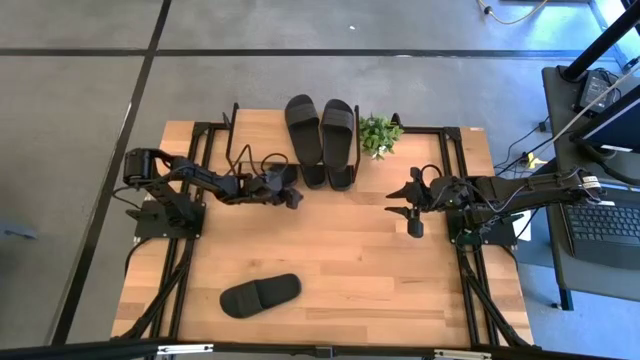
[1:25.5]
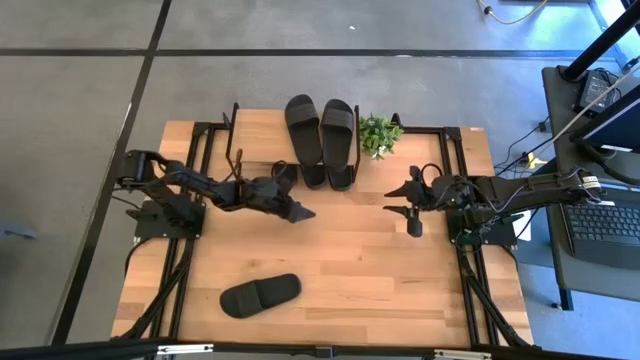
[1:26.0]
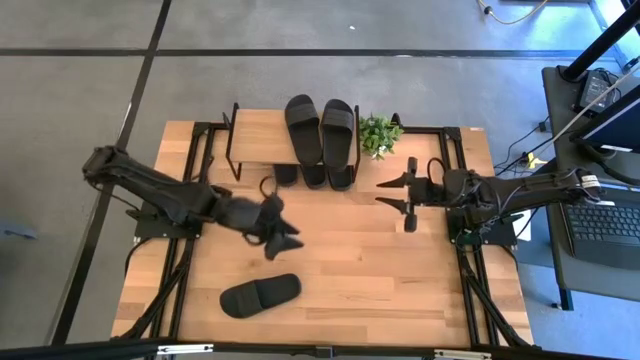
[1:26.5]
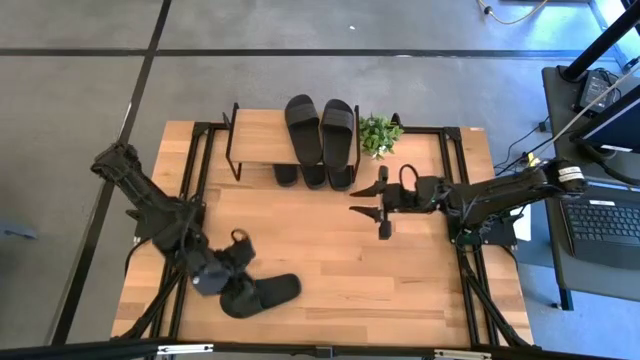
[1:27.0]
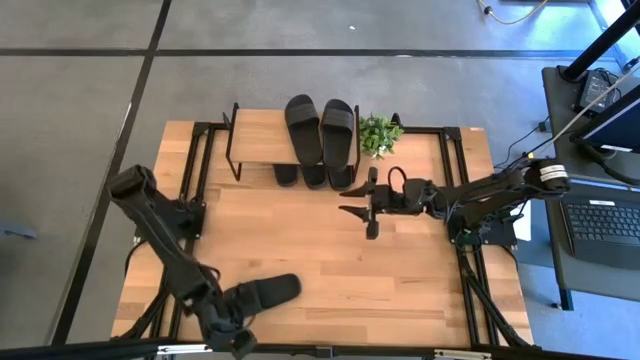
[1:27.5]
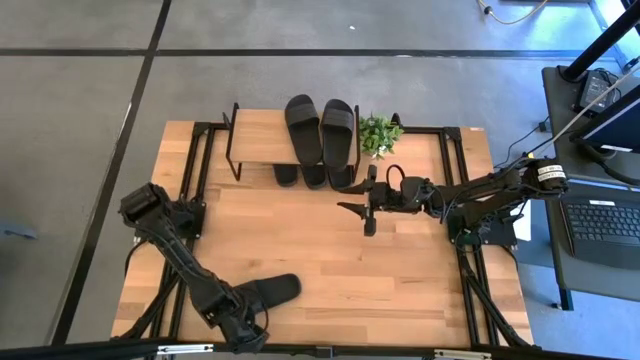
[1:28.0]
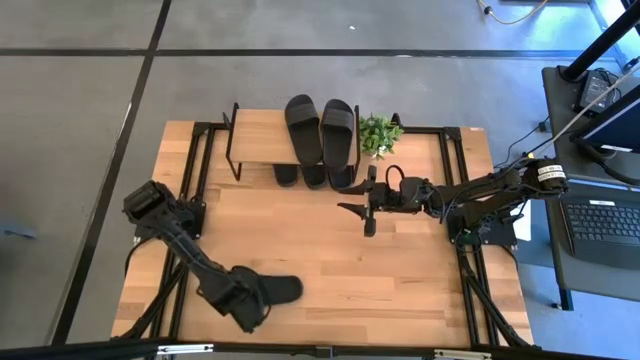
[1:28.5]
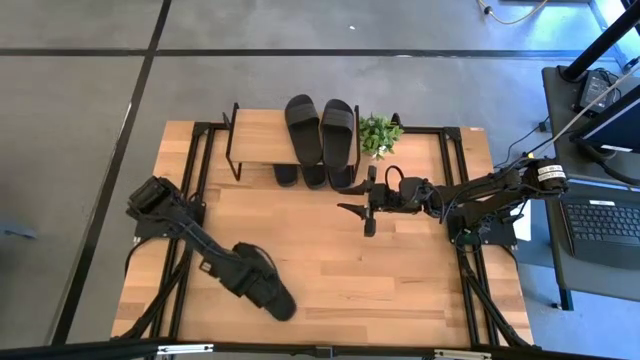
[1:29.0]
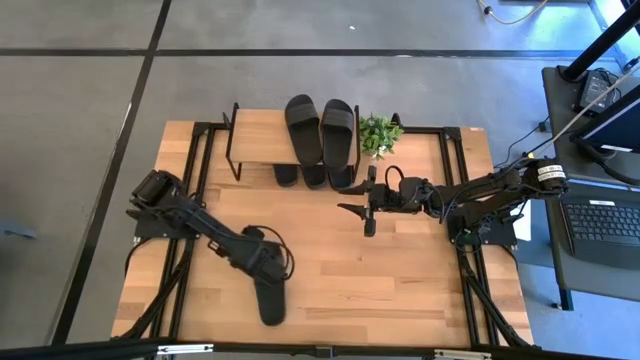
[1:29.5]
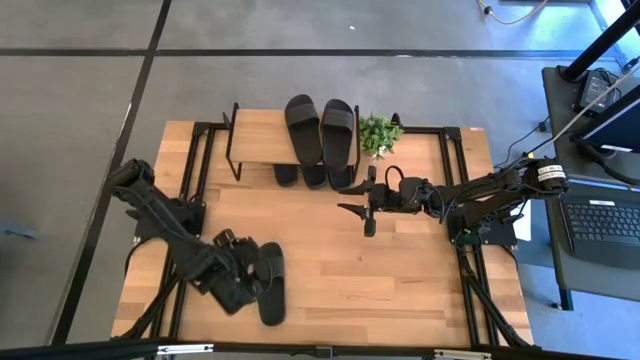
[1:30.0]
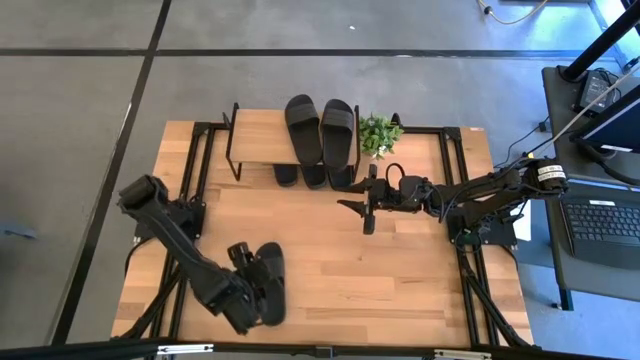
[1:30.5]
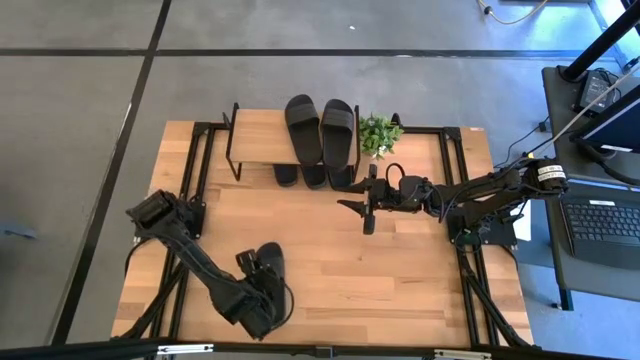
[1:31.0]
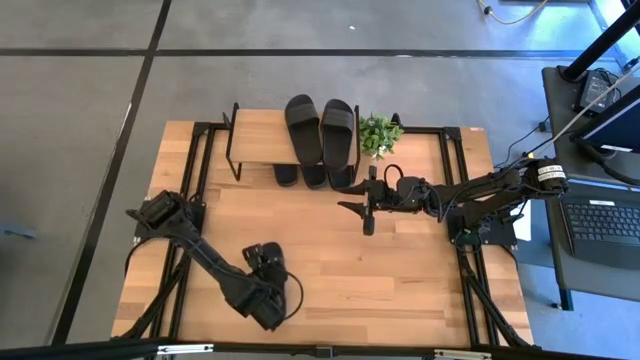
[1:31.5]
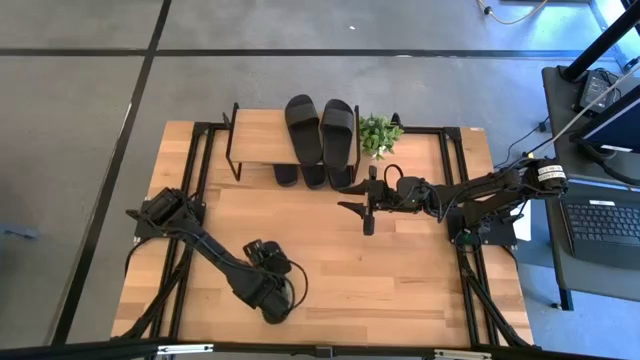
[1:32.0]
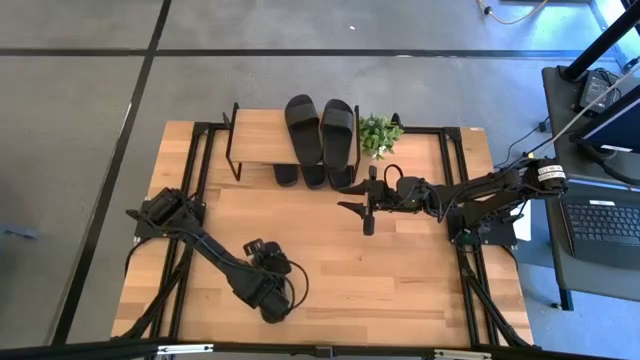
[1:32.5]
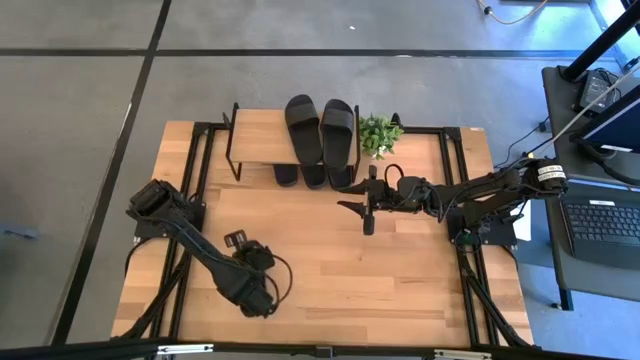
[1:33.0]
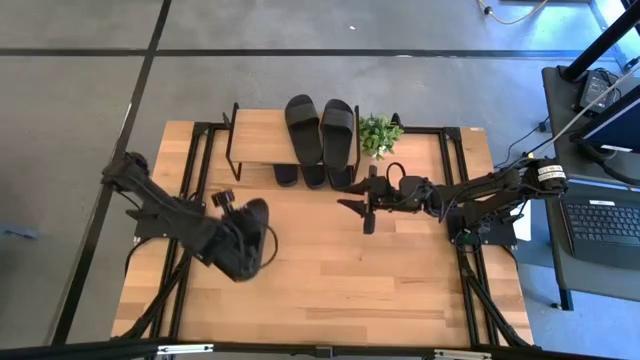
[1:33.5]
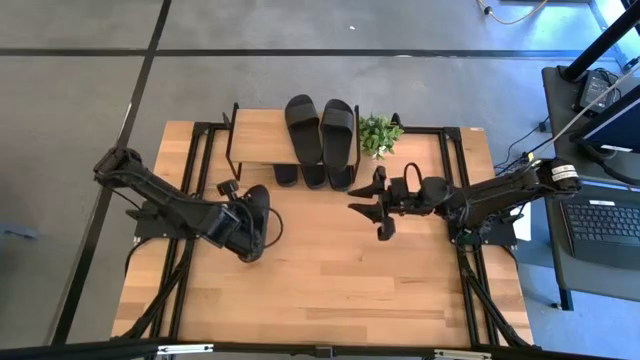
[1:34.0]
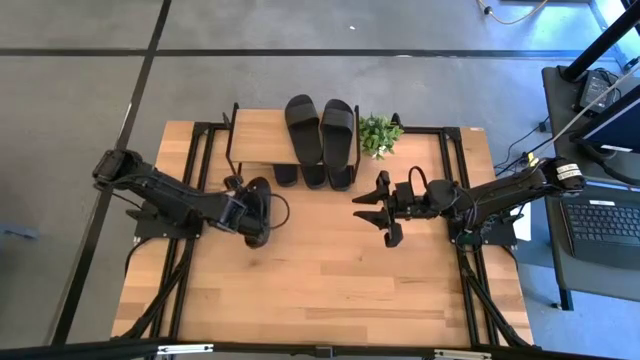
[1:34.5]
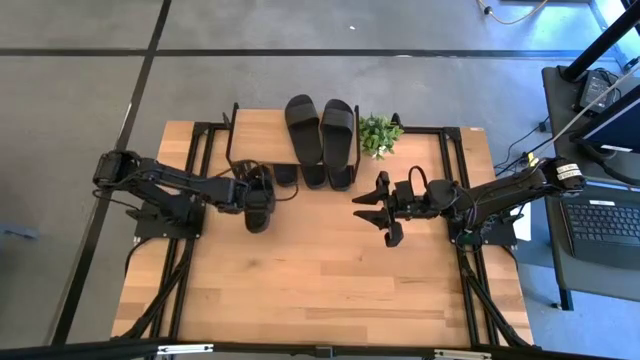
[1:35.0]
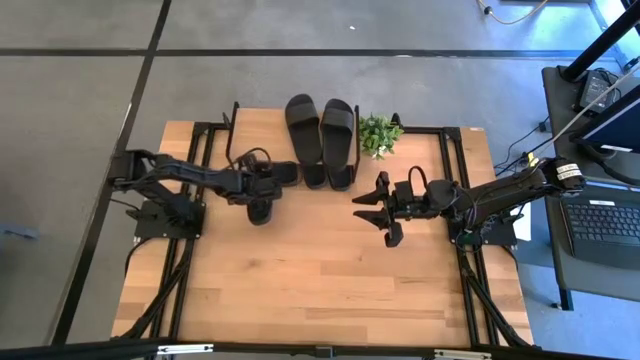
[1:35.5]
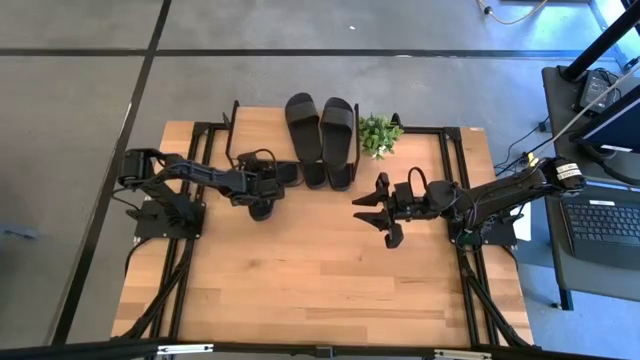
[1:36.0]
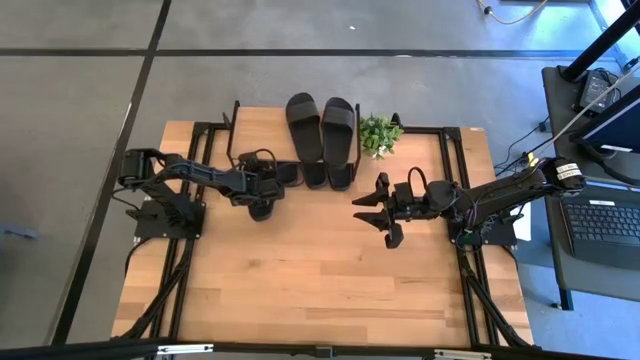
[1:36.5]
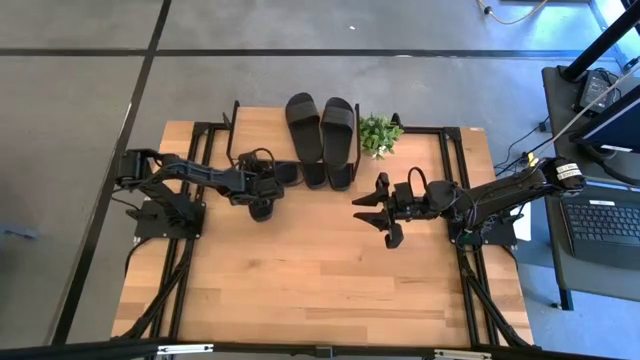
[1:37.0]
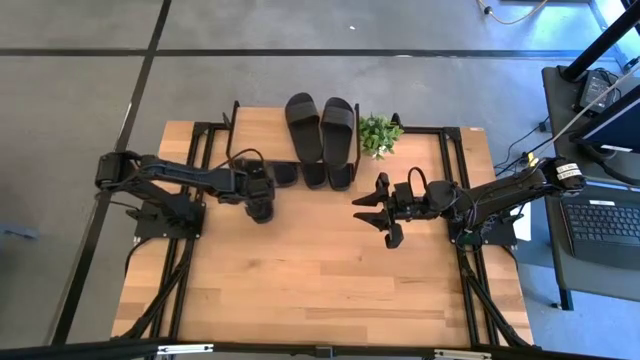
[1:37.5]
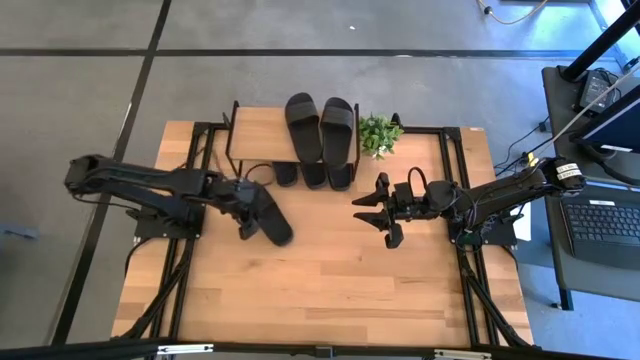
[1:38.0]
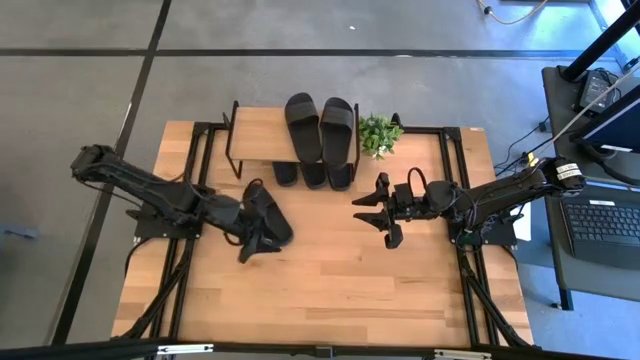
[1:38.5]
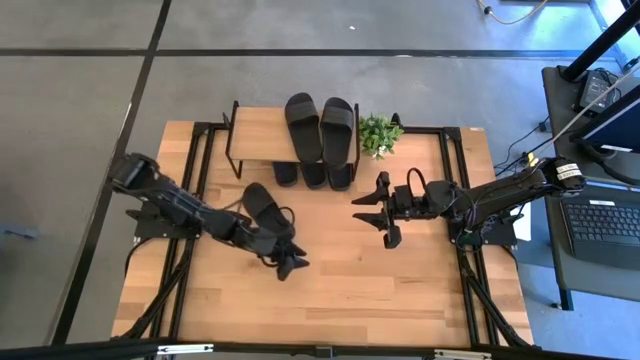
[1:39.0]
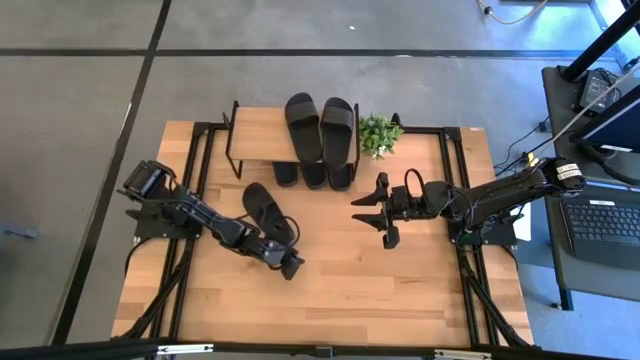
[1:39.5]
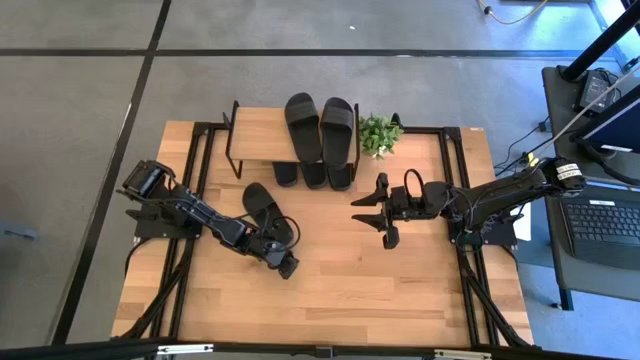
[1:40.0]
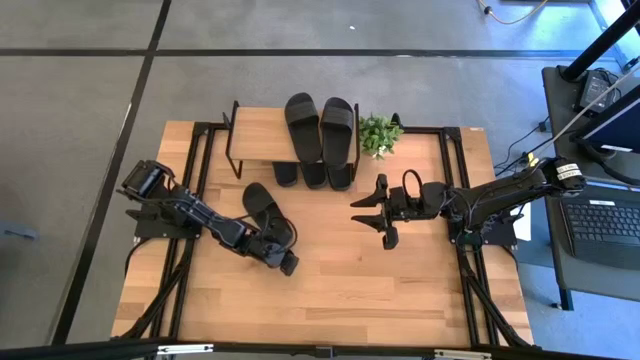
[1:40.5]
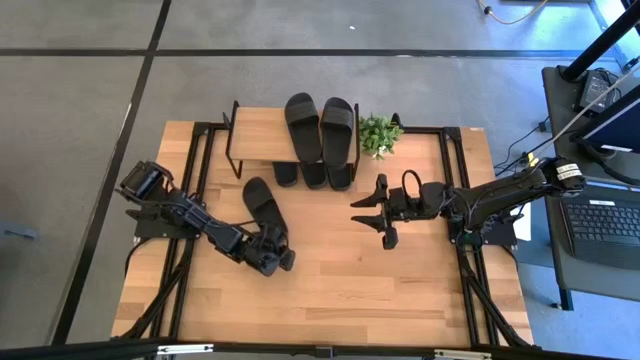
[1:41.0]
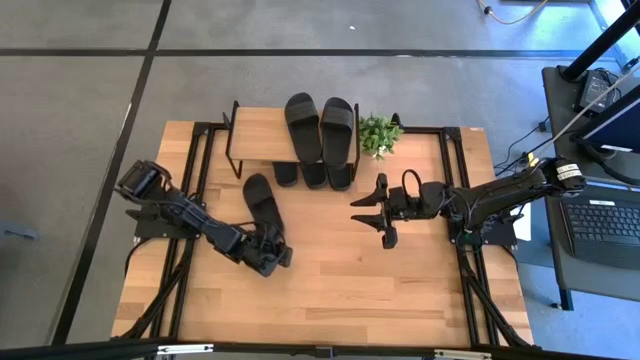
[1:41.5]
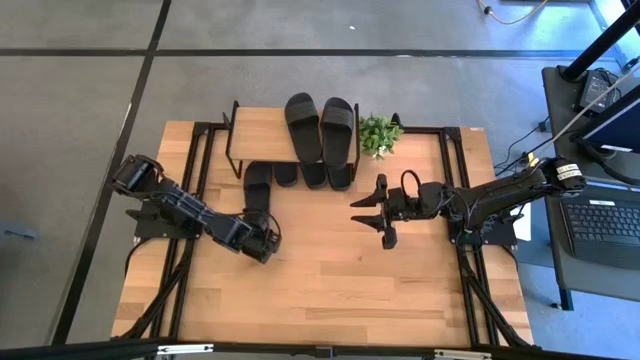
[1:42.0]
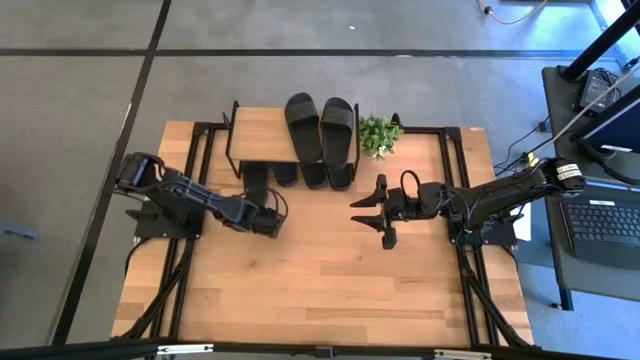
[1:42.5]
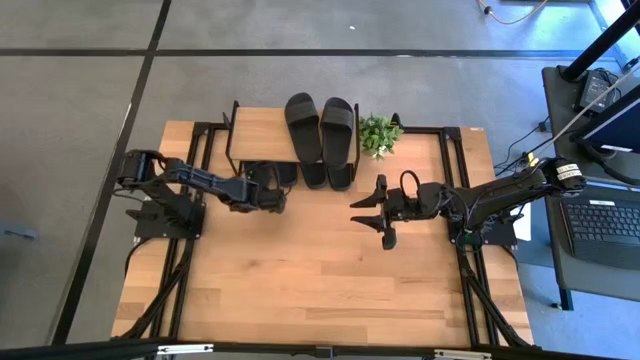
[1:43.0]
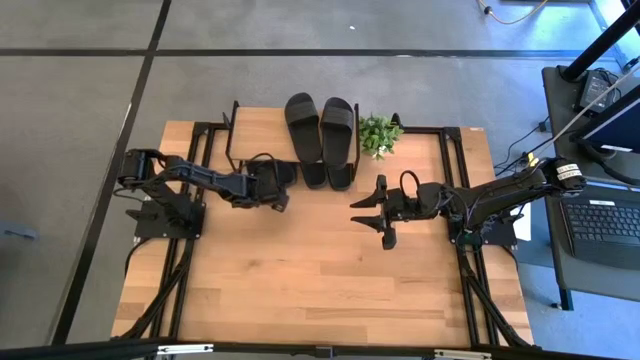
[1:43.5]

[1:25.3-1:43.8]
Task: Pick and place slides into the shelf
Put the black slide under the shelf

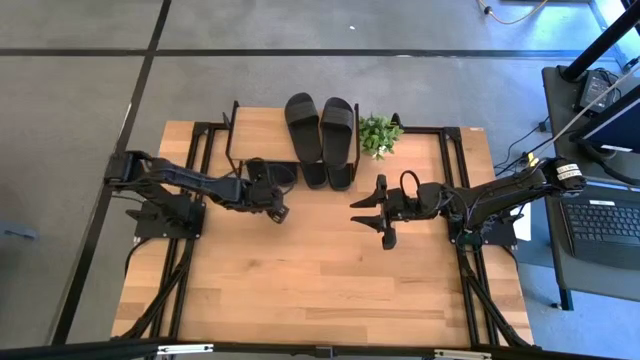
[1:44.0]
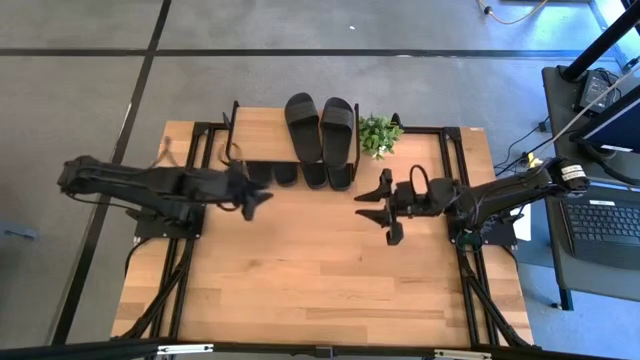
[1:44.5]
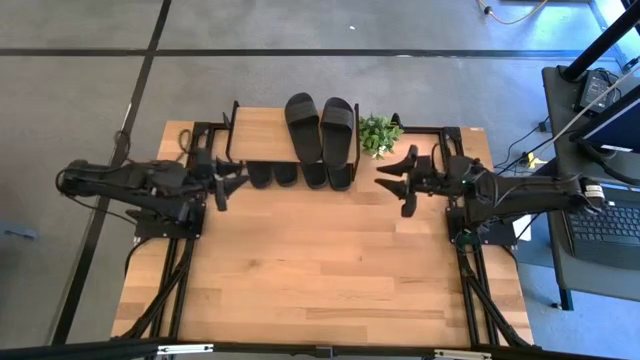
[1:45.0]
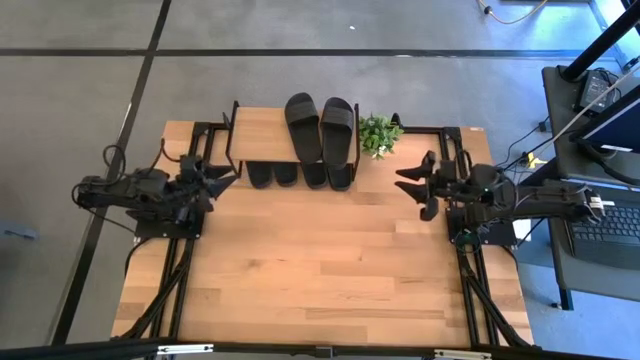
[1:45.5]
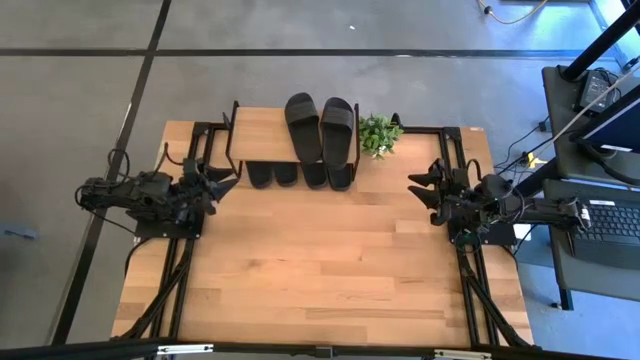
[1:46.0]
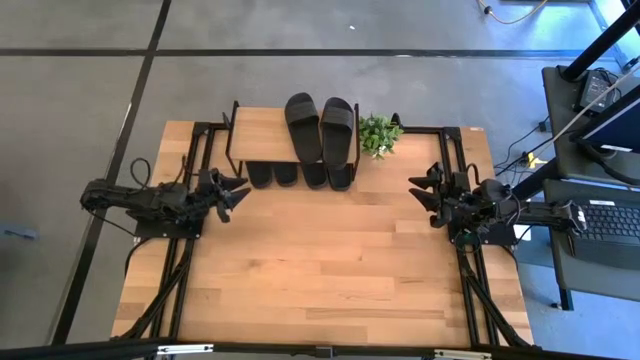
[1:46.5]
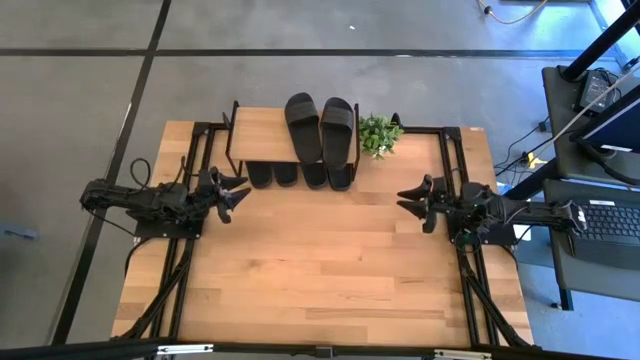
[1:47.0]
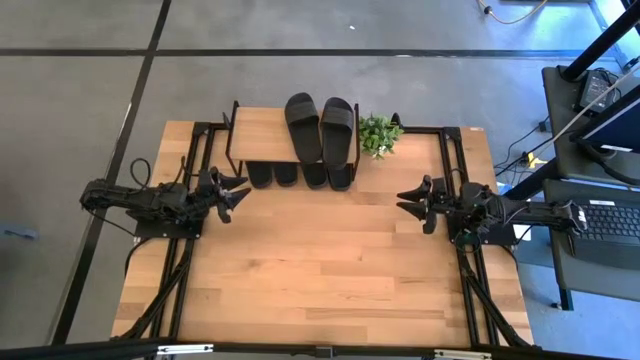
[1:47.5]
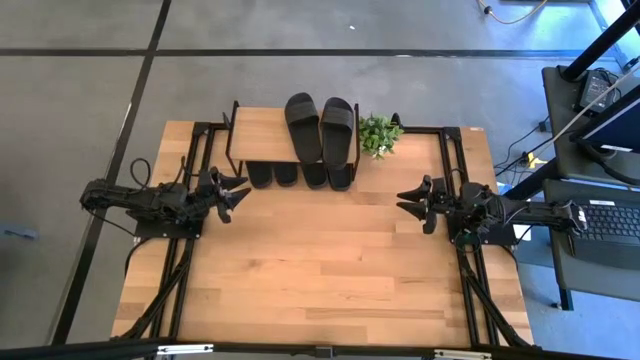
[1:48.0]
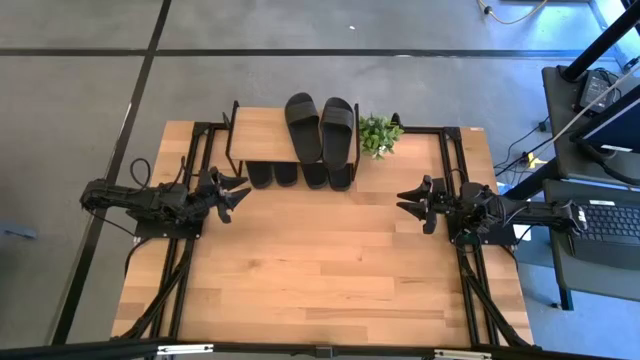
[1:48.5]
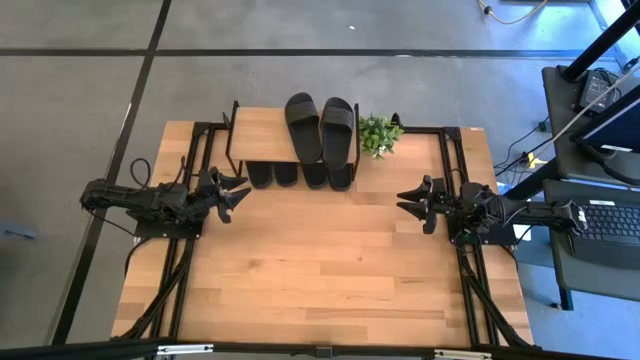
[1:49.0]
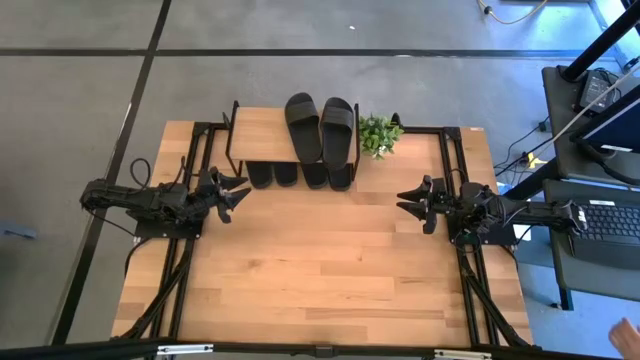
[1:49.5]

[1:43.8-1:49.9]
Return to Home Position
